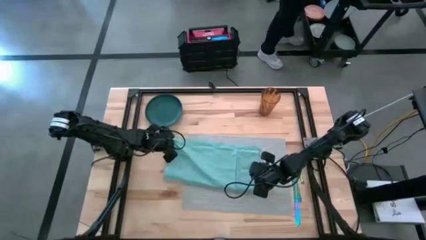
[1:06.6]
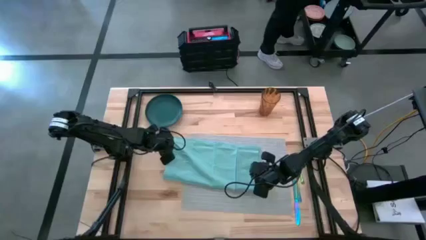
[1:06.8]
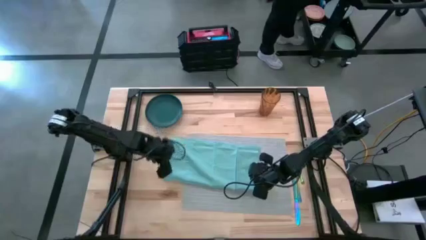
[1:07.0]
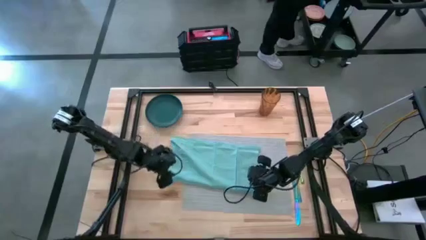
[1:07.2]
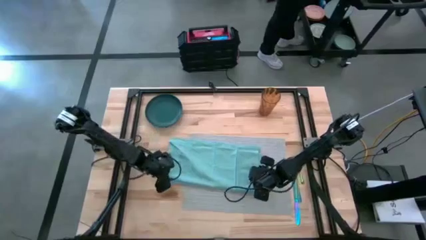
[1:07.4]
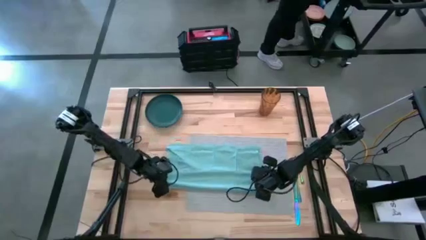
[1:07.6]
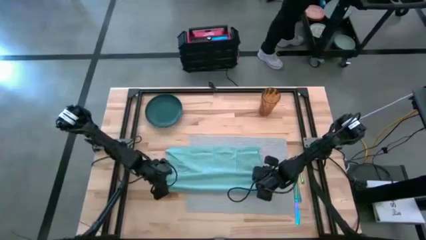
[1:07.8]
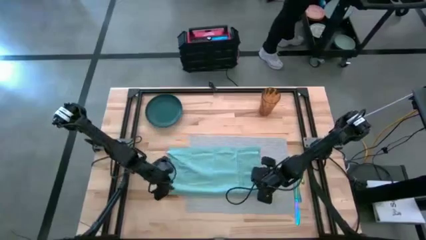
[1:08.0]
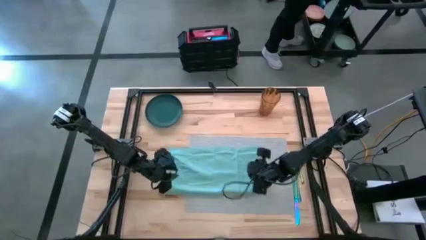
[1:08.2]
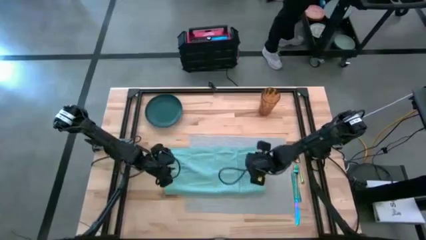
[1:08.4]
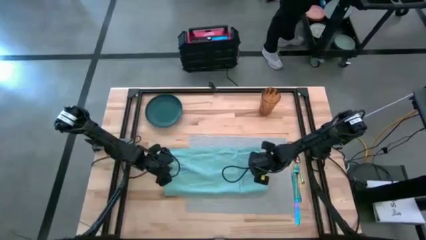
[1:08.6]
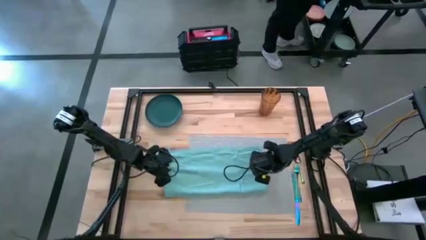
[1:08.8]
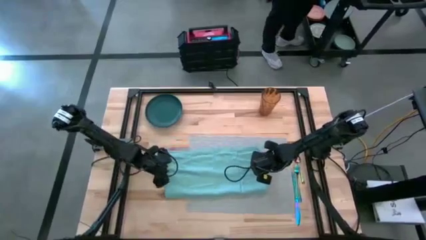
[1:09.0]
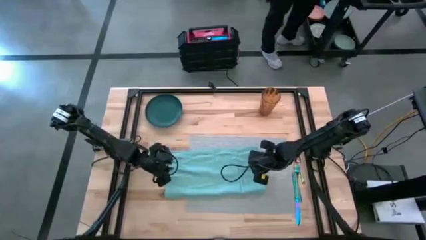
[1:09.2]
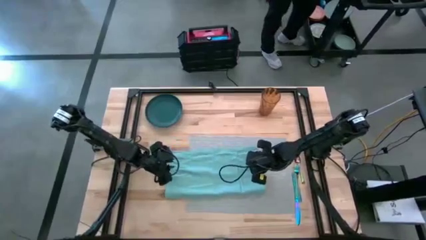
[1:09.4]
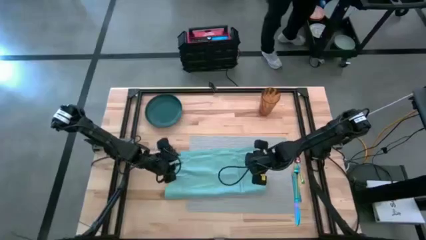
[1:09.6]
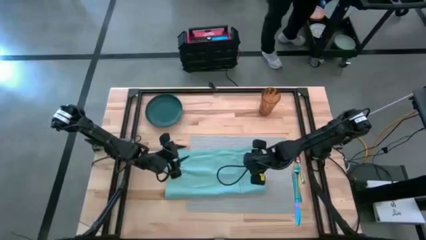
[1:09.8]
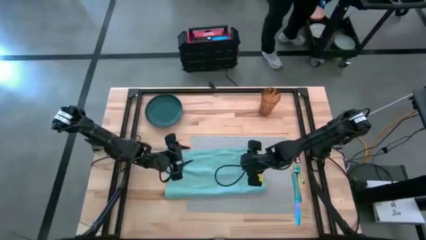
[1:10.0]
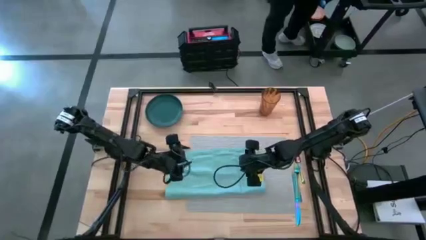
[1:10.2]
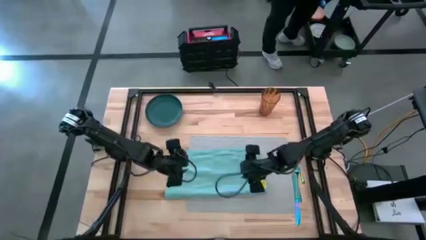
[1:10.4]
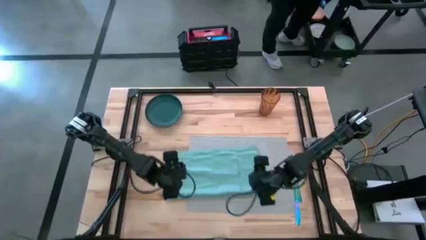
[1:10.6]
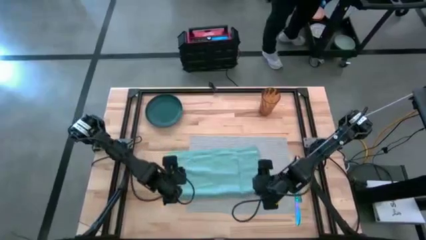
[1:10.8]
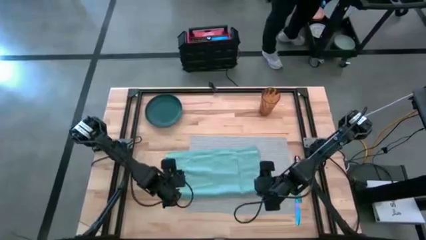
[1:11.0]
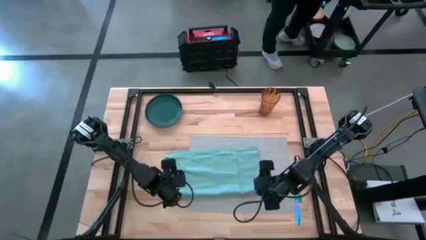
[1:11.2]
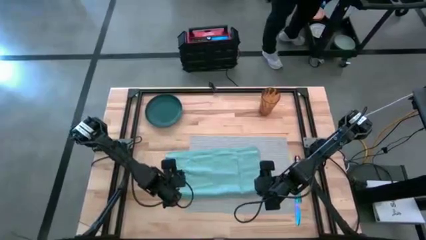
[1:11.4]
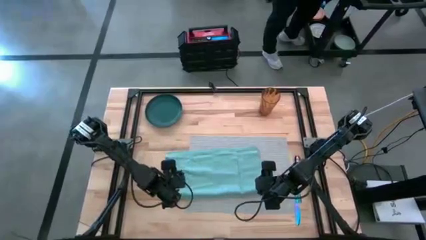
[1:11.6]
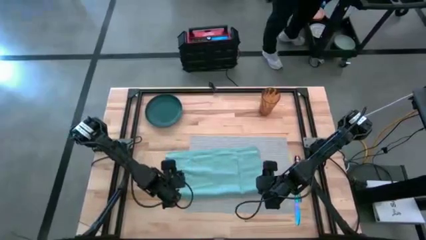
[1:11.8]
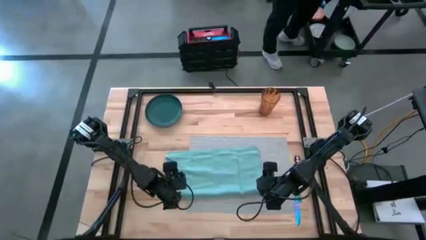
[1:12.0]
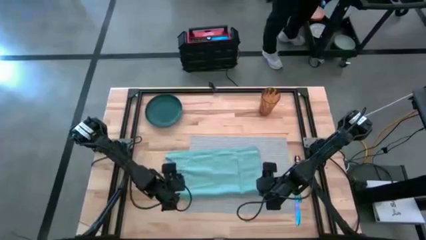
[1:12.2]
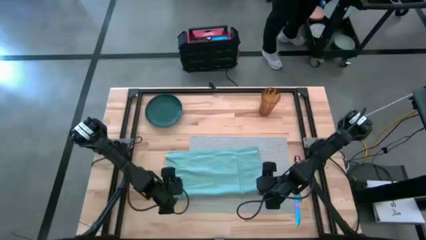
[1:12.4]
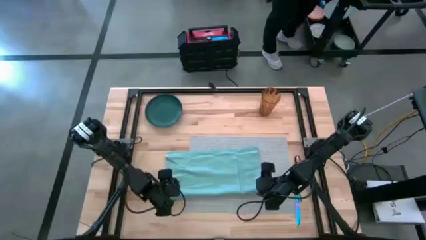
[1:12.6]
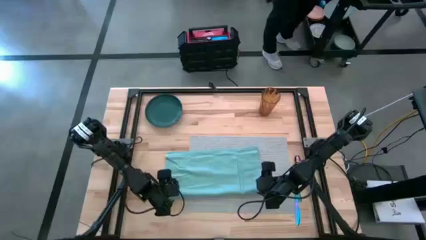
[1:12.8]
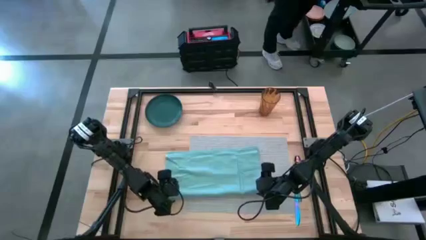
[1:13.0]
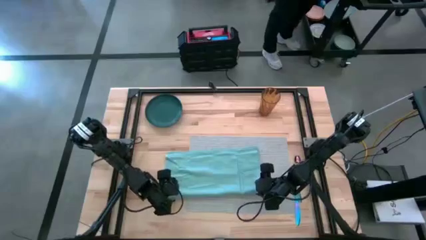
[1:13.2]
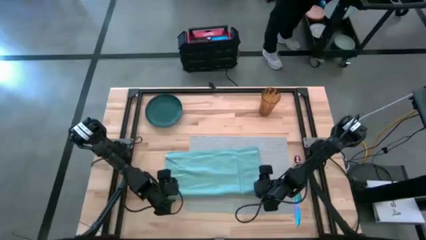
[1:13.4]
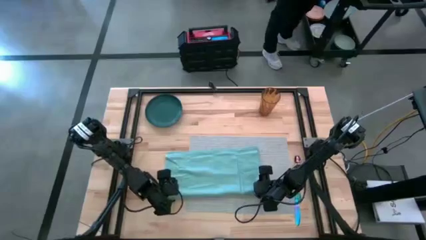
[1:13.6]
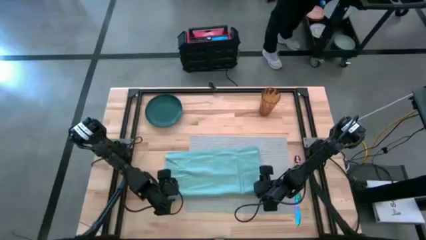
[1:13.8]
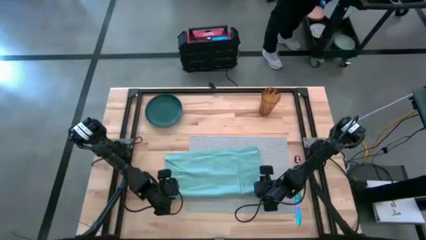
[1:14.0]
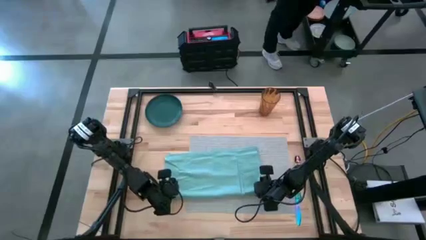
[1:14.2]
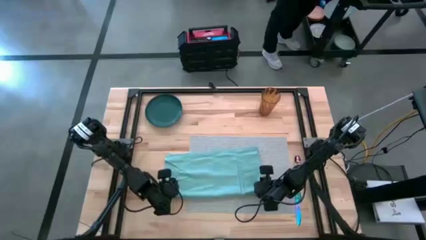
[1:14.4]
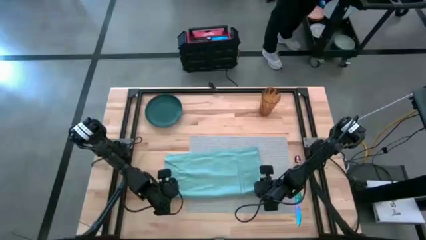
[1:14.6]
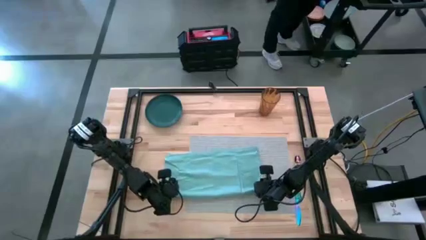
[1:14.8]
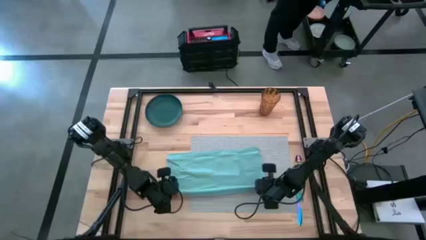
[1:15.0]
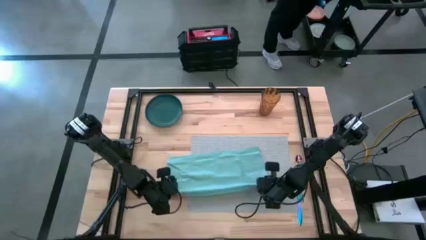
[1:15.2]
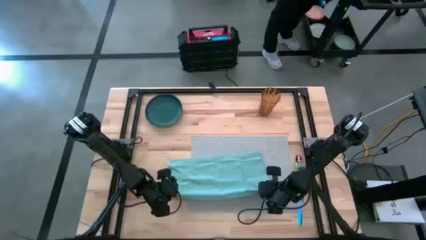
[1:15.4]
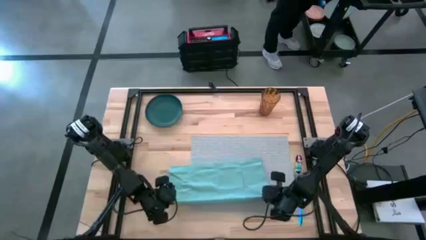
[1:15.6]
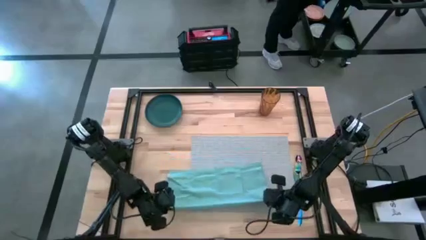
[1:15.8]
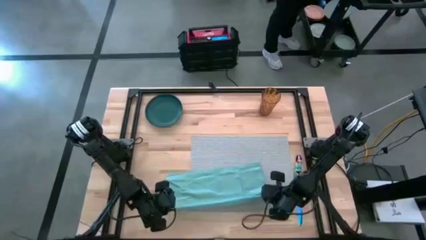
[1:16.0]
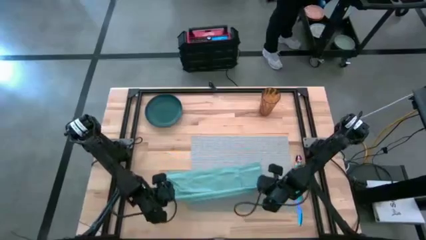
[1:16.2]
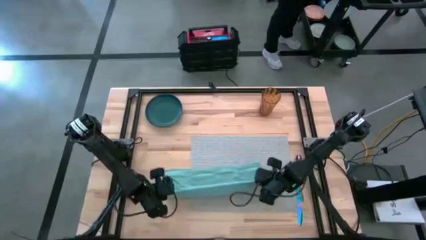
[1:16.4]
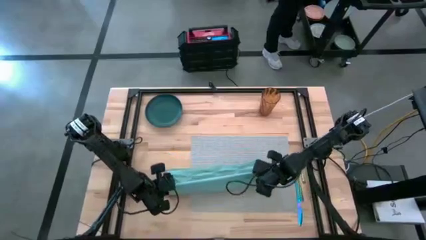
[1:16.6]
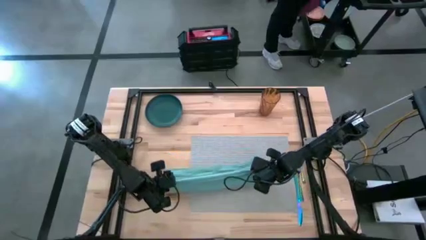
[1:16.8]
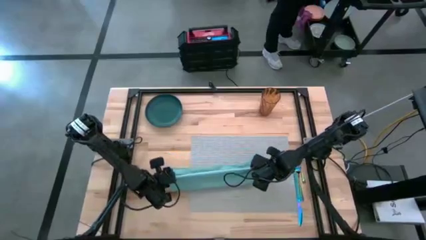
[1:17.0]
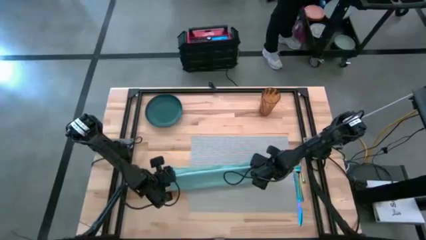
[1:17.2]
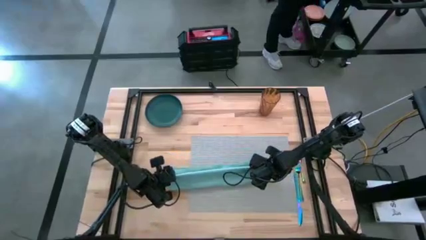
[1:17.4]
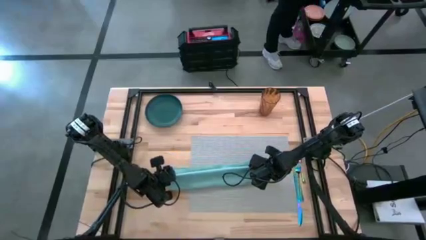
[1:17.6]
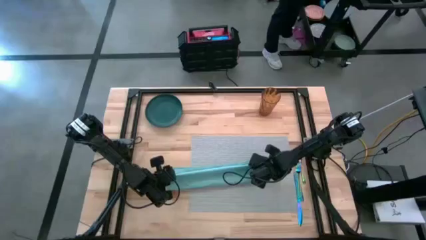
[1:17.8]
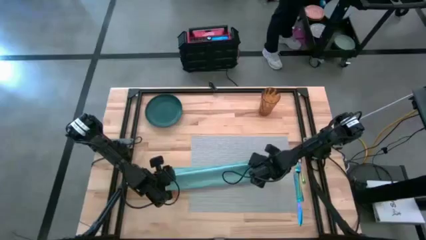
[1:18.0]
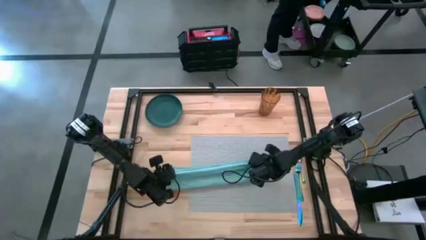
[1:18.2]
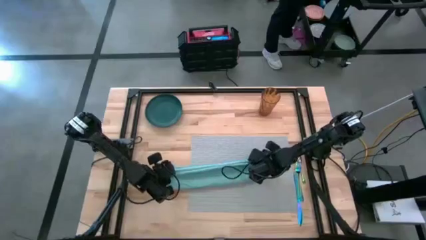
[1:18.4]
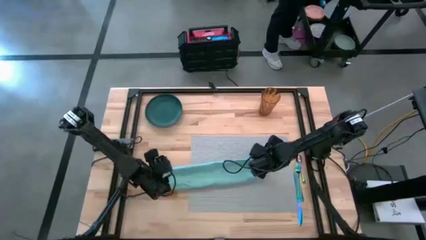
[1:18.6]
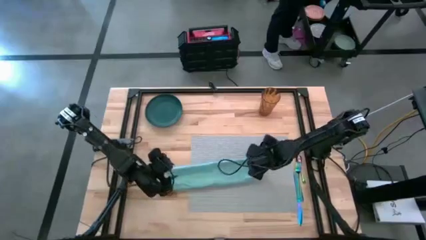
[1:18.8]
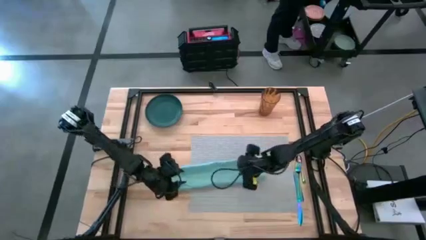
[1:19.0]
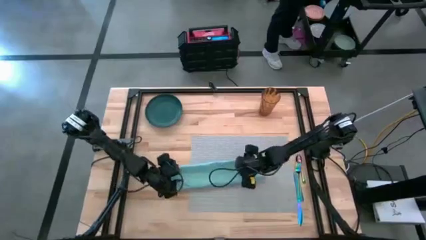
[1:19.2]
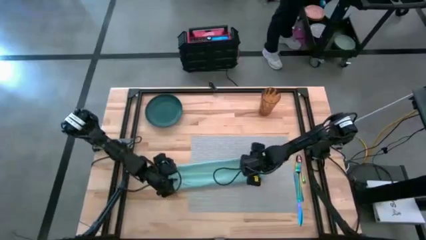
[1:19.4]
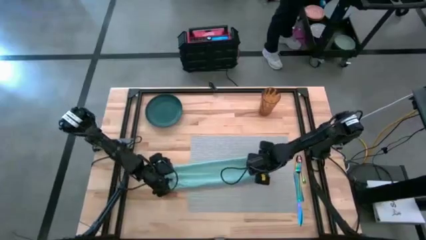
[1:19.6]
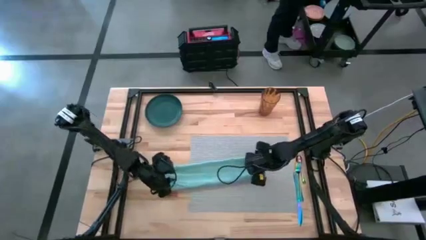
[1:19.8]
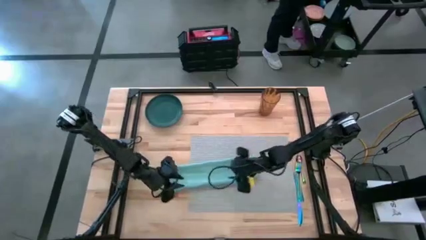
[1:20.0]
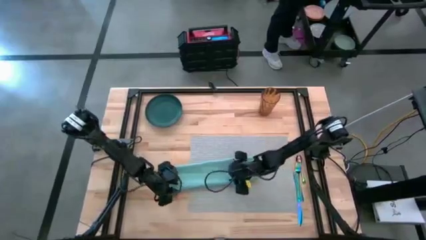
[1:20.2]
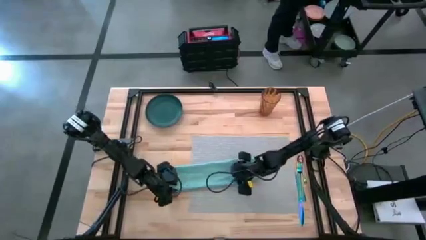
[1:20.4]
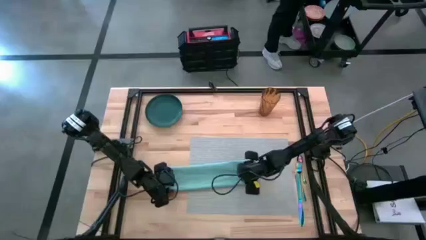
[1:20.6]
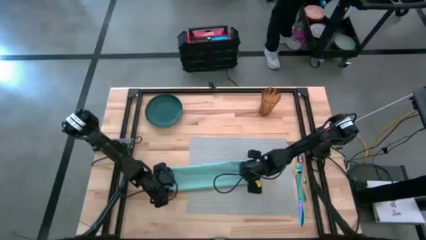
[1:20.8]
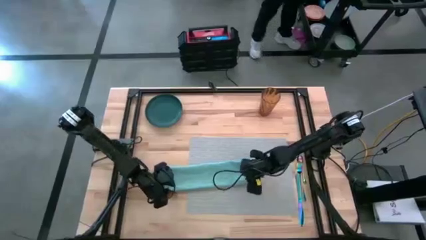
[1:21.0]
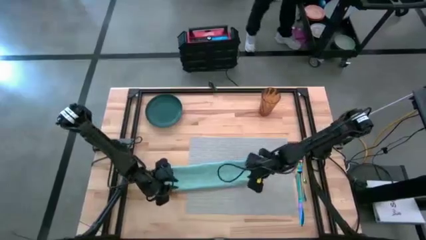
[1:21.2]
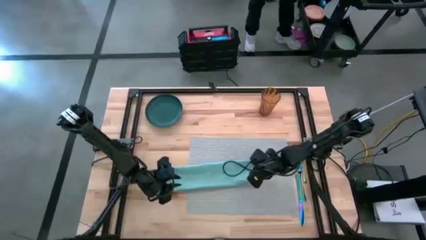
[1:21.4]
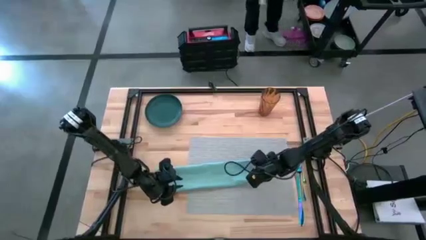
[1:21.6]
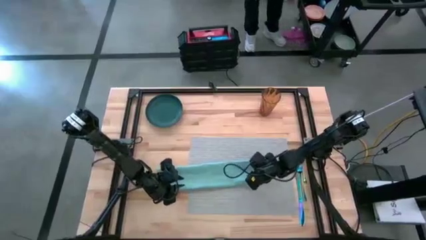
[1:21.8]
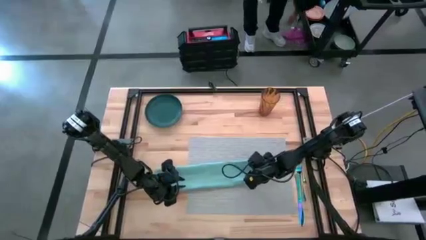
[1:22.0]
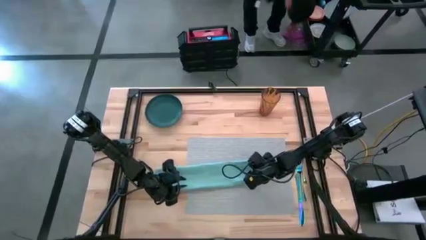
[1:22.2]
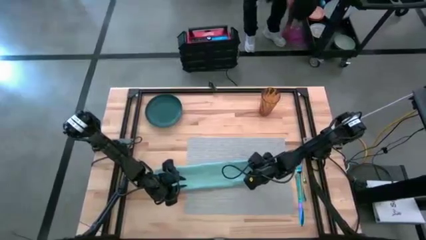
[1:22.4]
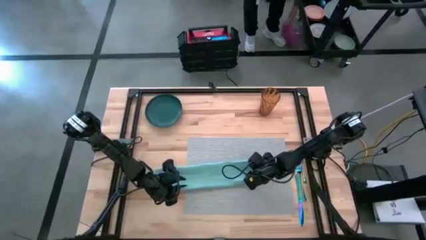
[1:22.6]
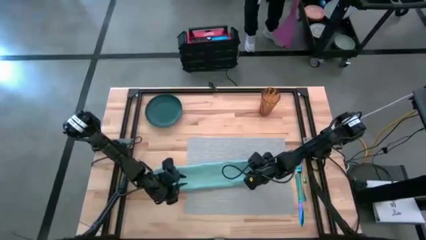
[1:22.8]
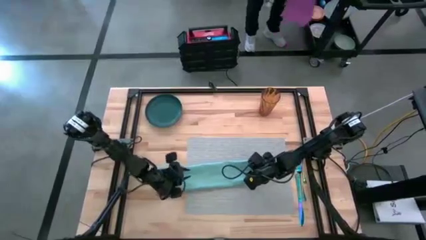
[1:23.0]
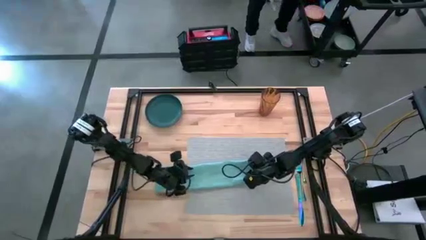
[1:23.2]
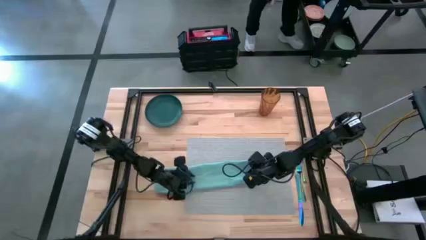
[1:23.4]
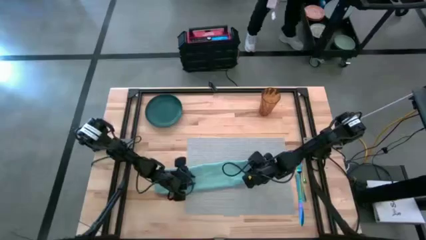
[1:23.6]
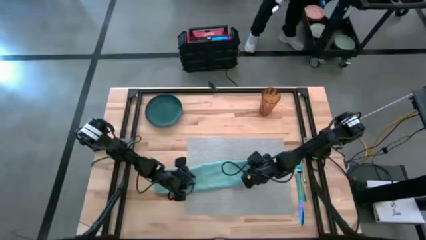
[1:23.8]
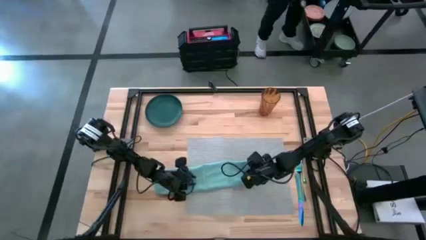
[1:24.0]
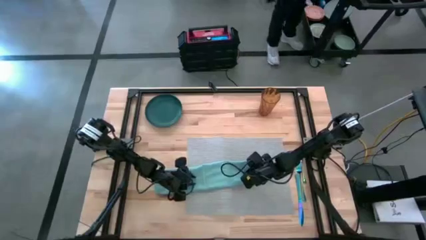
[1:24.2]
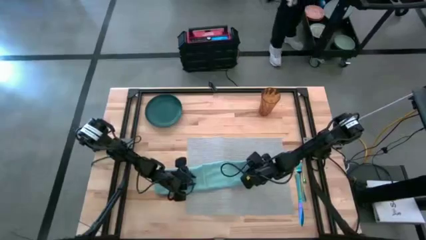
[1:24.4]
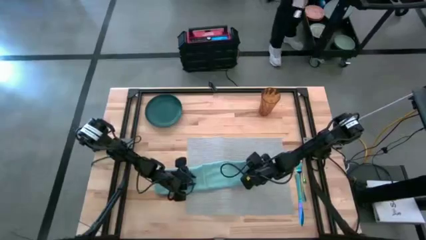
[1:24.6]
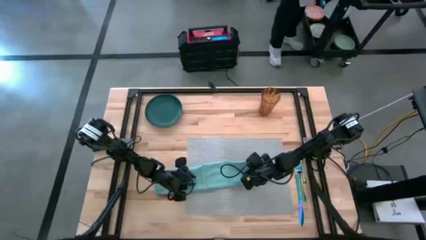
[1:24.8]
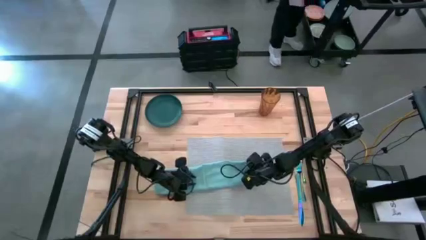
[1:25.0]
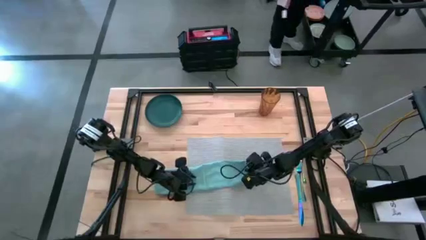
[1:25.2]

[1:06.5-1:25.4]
Task: Set table place
Fold the light blue table napkin
